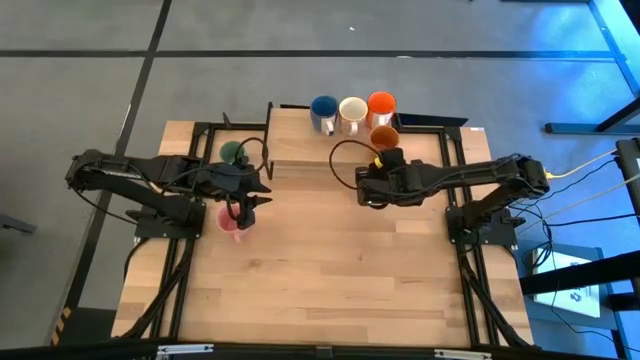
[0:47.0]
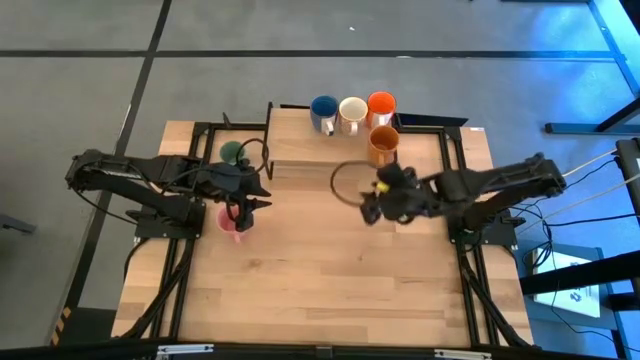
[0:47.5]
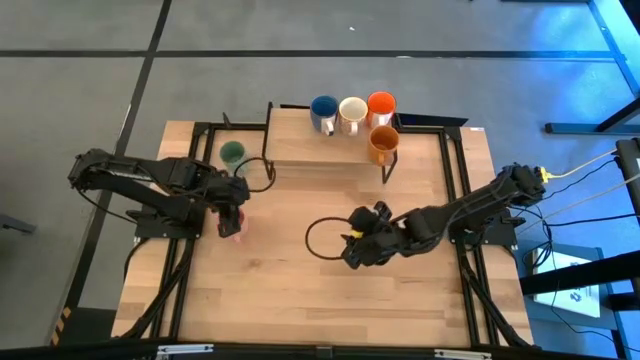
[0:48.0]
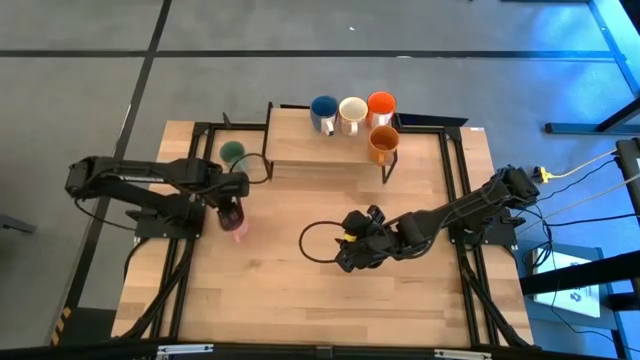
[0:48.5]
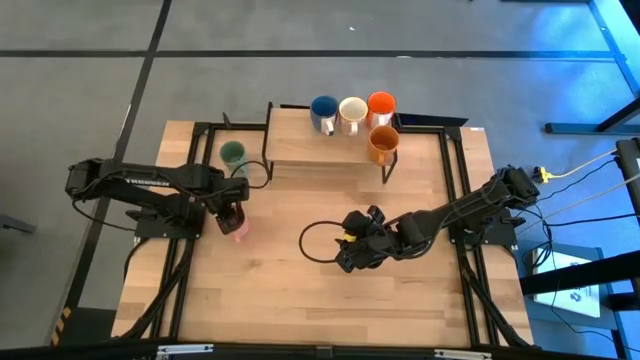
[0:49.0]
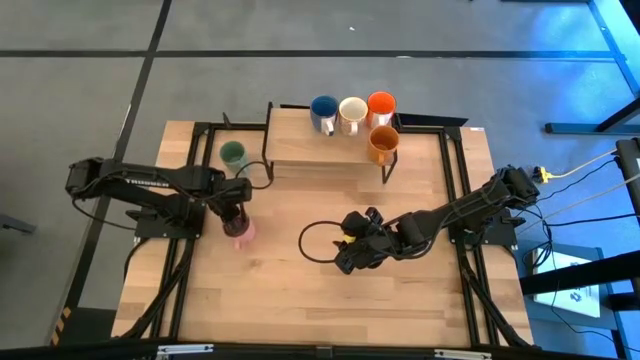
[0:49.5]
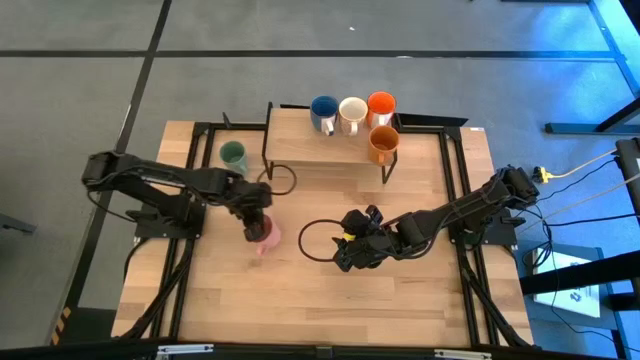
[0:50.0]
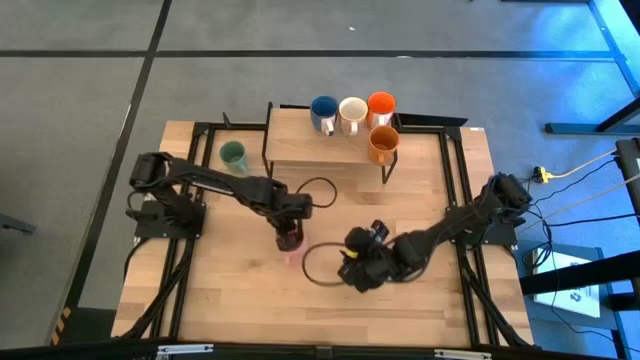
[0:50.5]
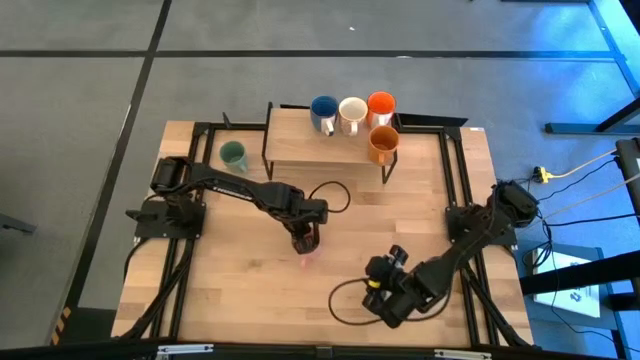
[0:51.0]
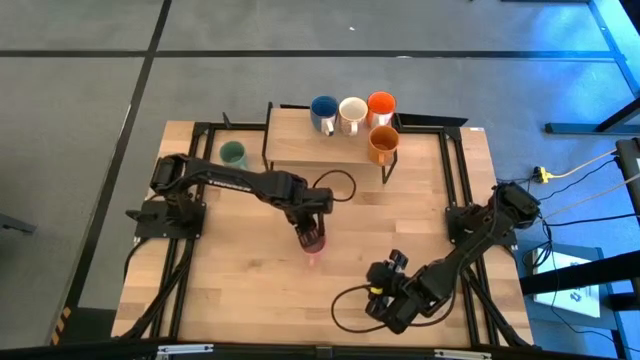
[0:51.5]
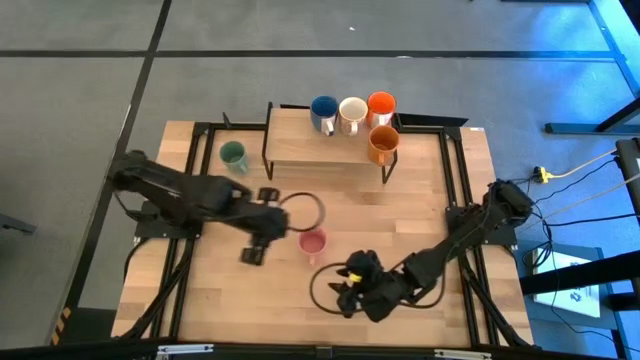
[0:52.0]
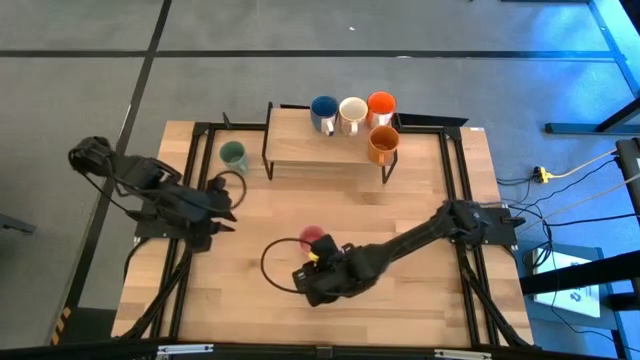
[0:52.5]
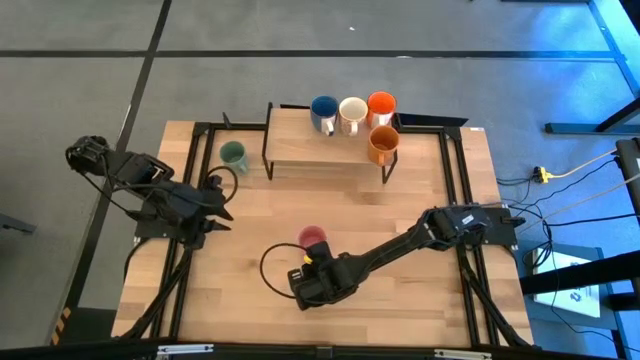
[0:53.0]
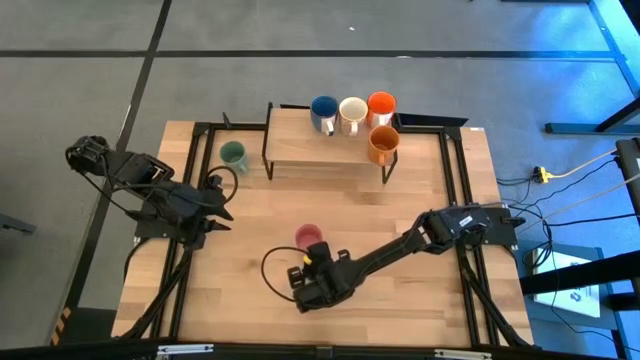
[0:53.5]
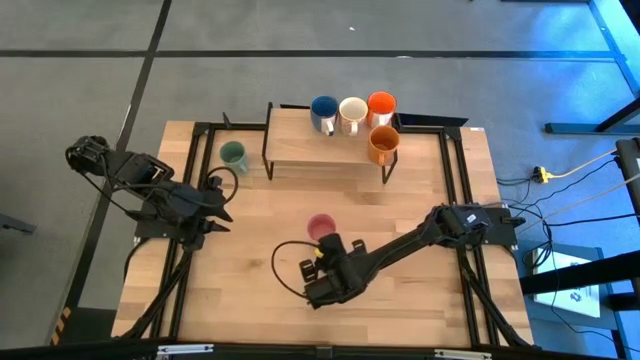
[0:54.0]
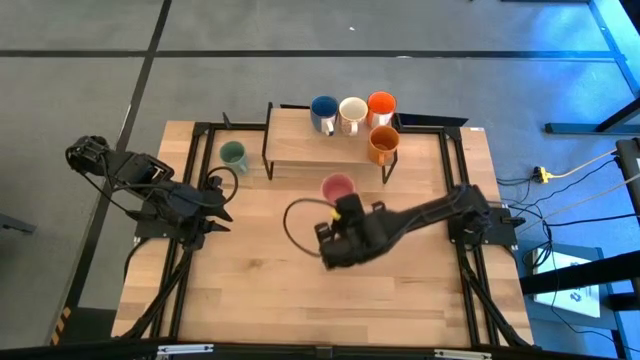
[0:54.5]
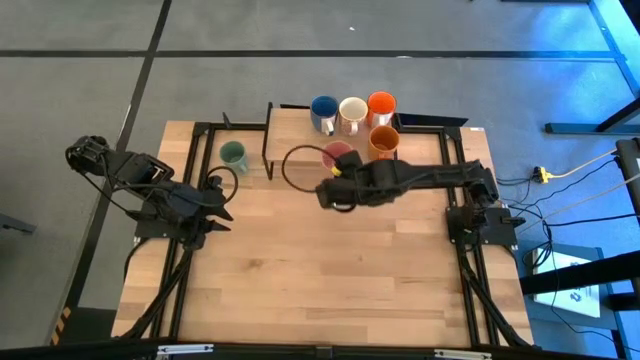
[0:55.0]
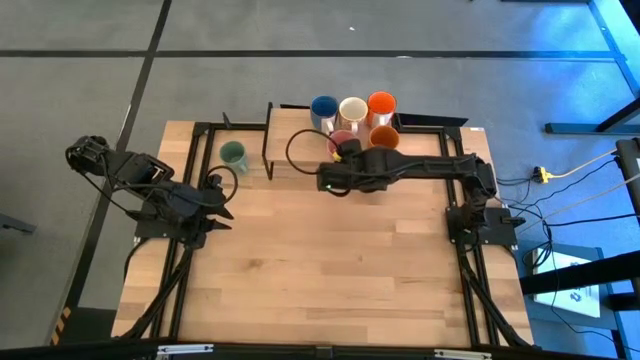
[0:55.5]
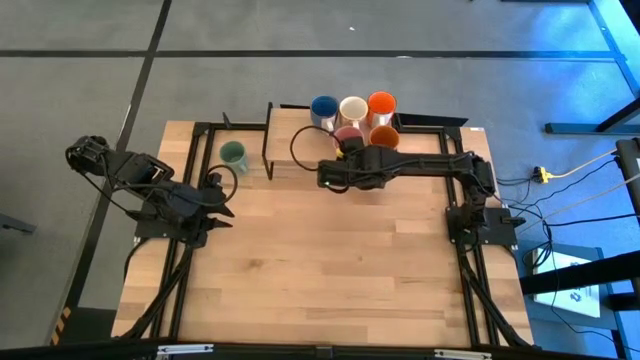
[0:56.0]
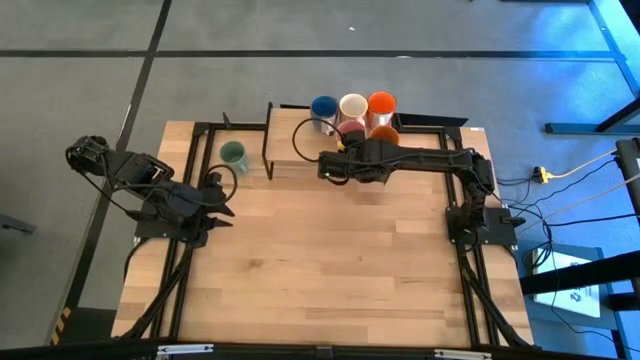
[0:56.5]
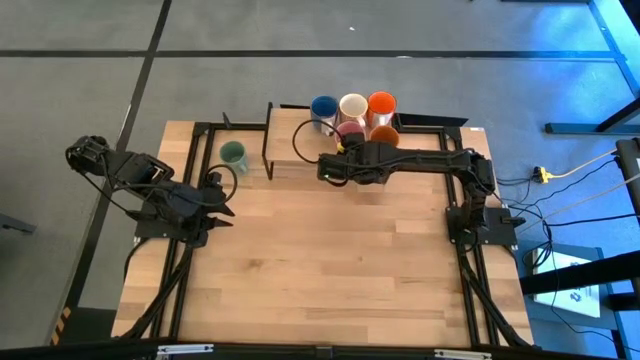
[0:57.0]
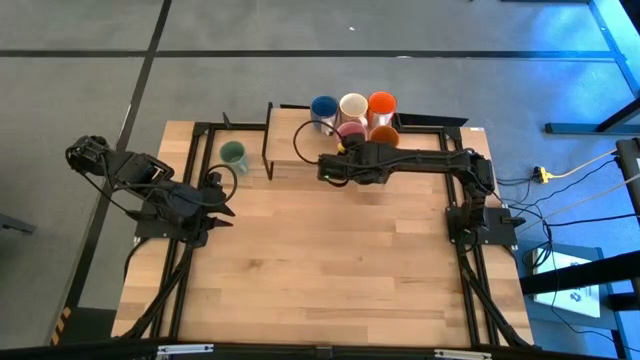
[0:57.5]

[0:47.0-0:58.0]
Task: Place coffee mugs
Put the pink mug on the shelf

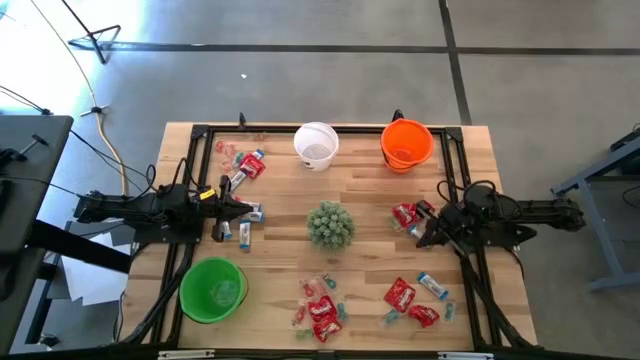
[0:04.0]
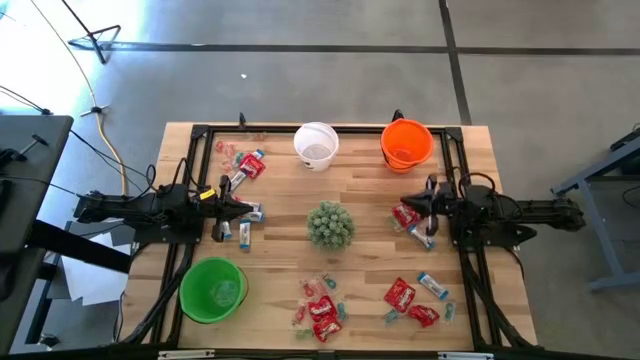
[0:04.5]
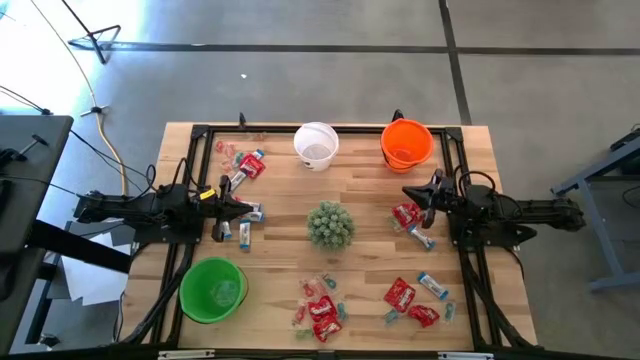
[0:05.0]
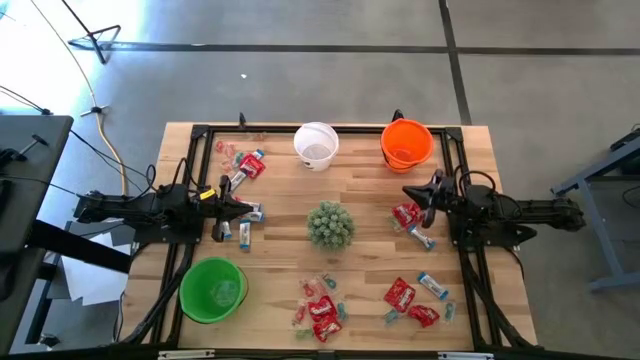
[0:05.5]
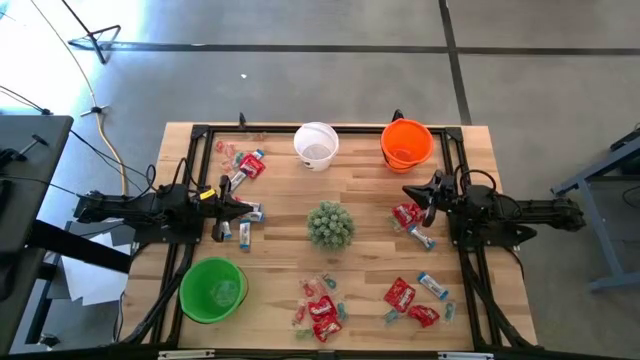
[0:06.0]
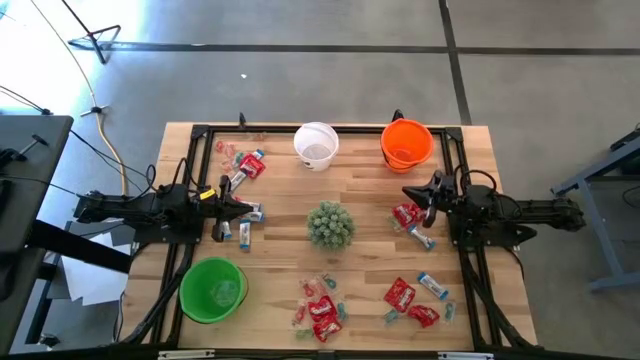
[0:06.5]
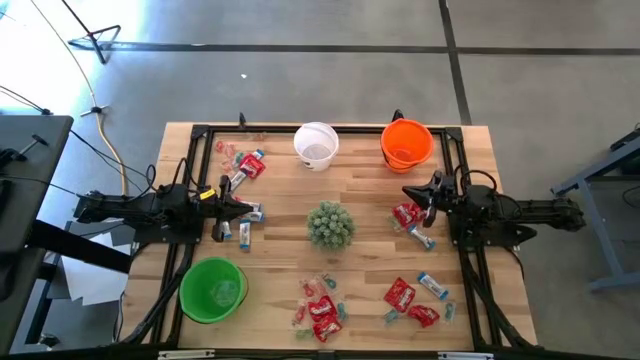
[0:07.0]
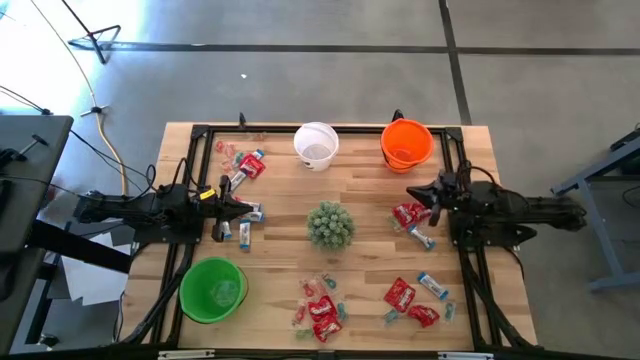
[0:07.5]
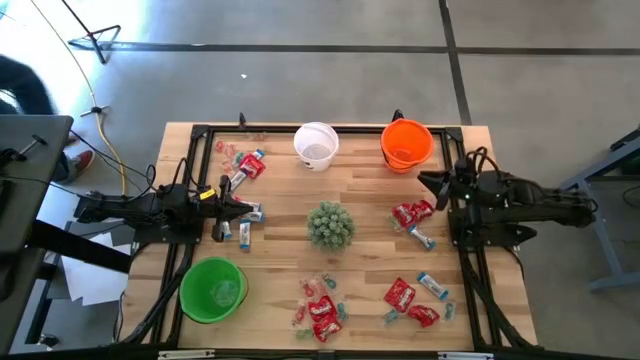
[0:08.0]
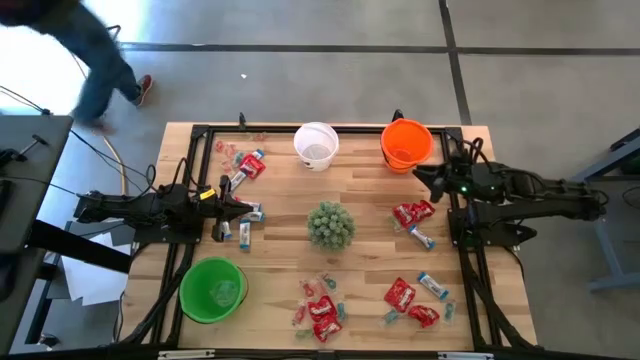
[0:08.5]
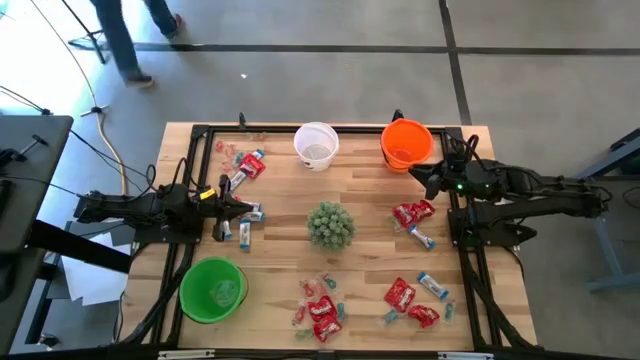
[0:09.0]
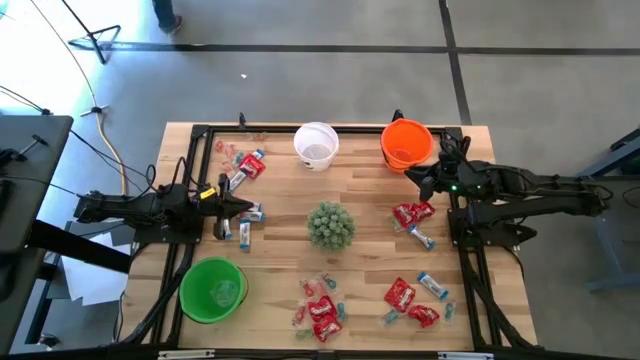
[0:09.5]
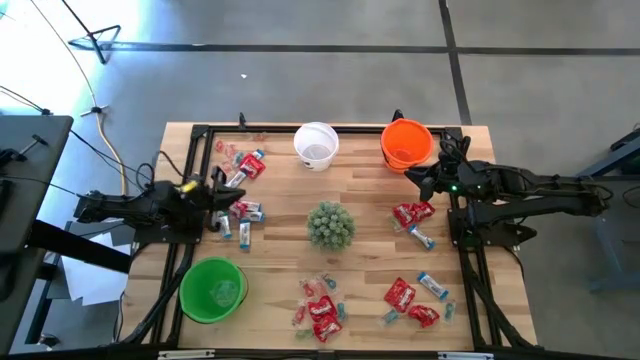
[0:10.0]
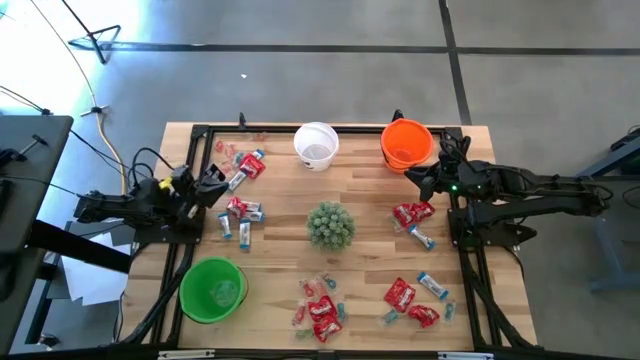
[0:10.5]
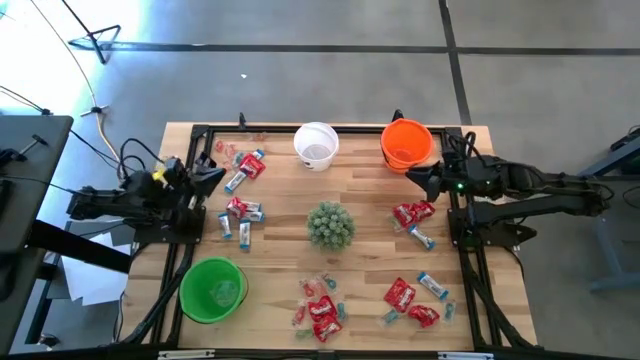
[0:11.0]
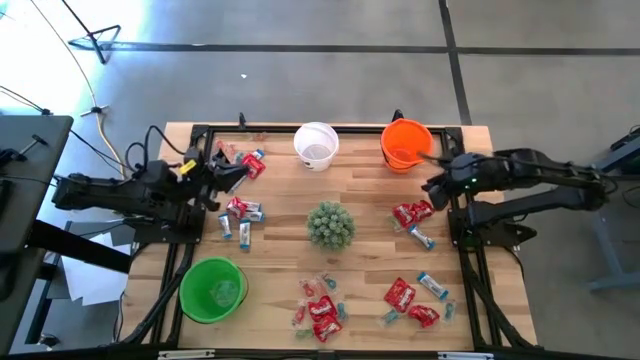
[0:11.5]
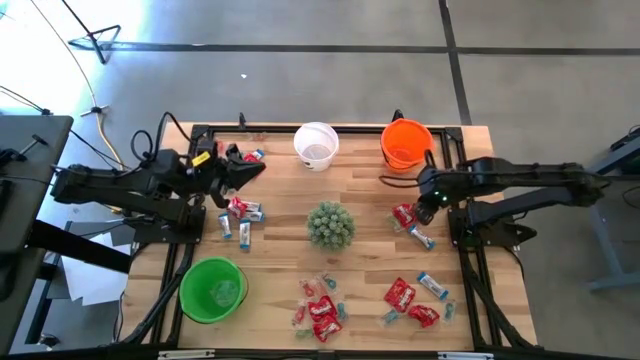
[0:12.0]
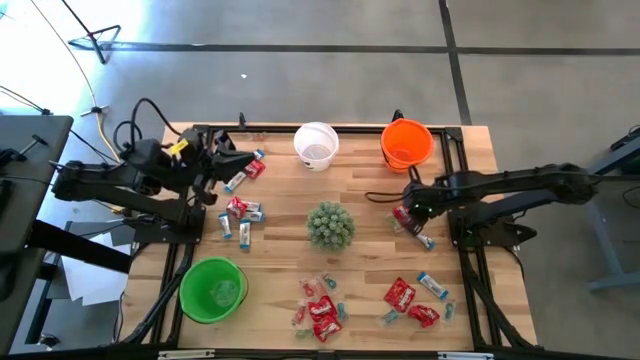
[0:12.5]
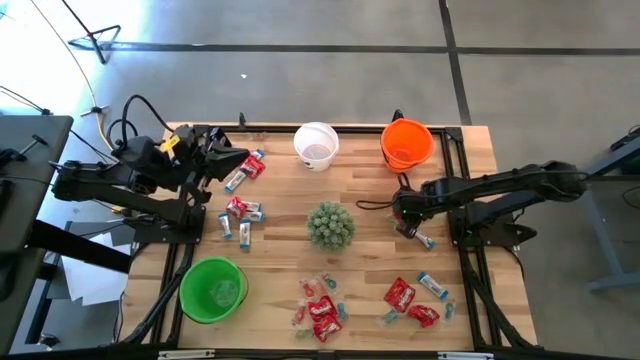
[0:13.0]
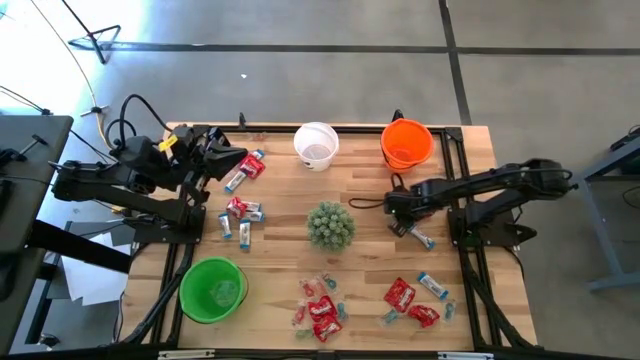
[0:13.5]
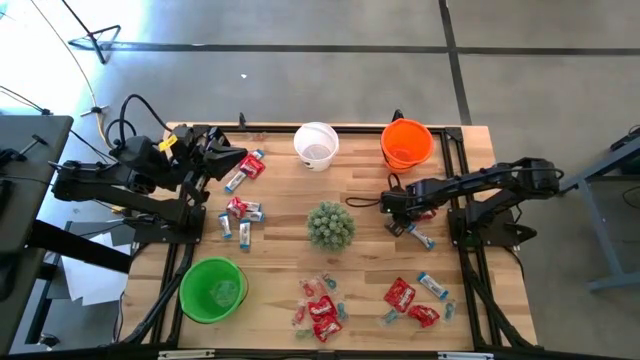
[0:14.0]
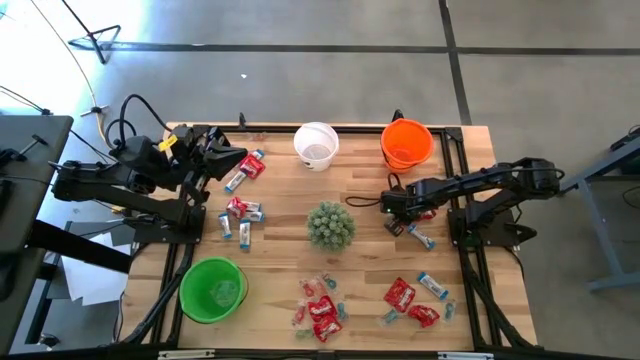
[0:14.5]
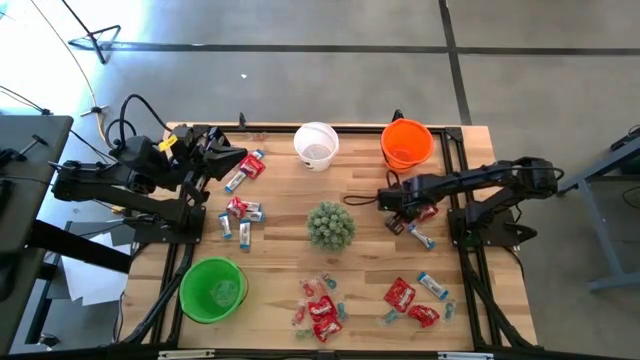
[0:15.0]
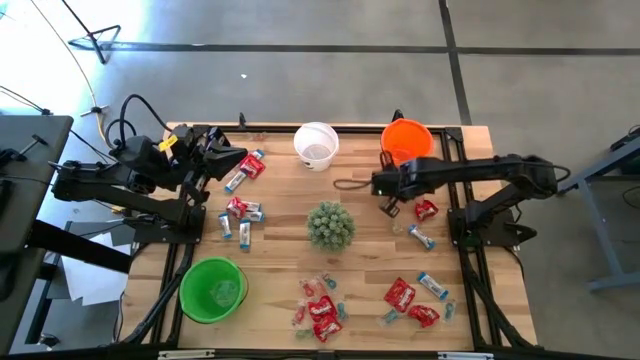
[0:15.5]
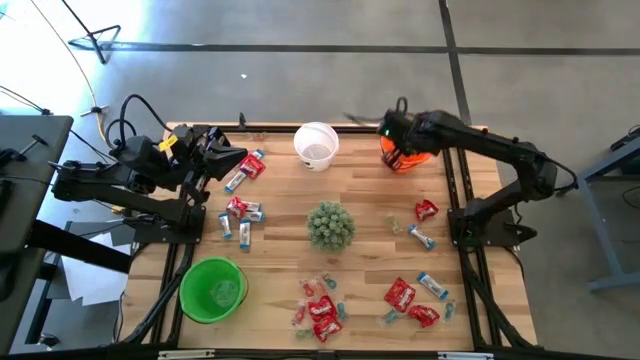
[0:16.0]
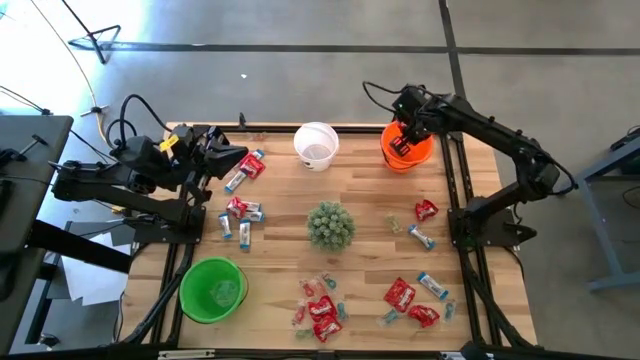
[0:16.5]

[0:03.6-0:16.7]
Task: Sort candy
Put the red candy into the orange bucket
